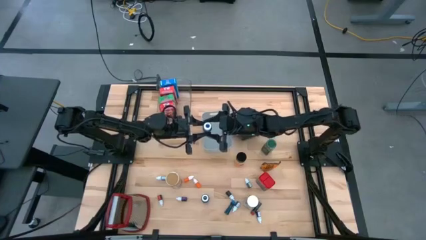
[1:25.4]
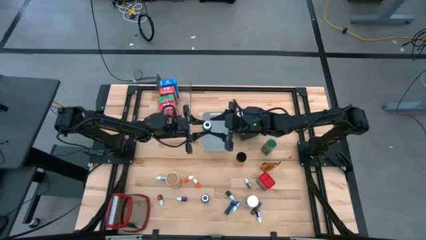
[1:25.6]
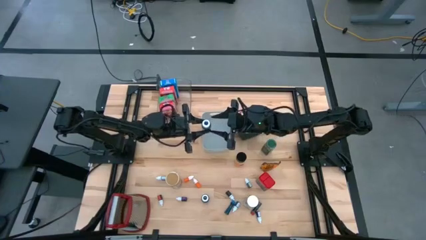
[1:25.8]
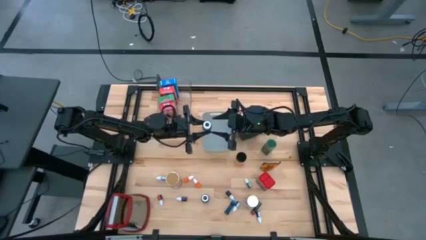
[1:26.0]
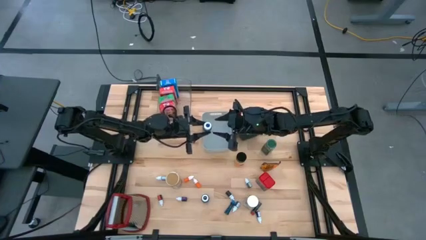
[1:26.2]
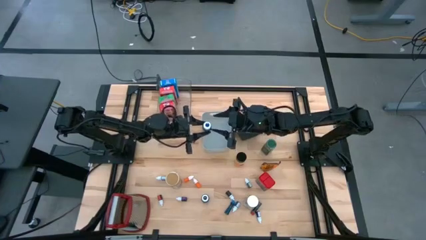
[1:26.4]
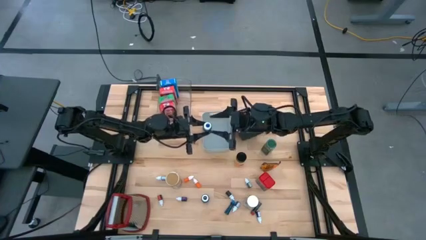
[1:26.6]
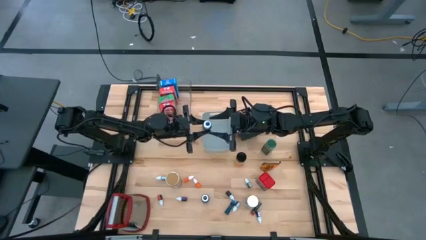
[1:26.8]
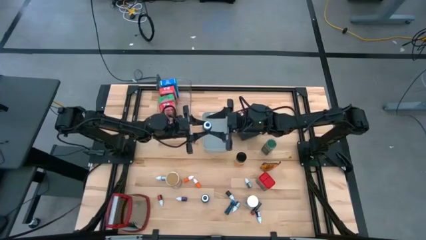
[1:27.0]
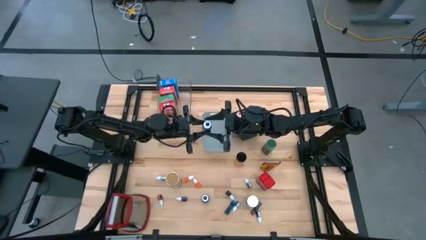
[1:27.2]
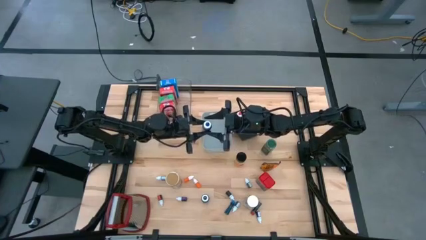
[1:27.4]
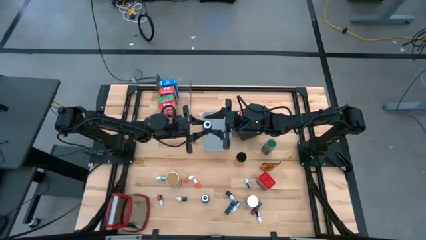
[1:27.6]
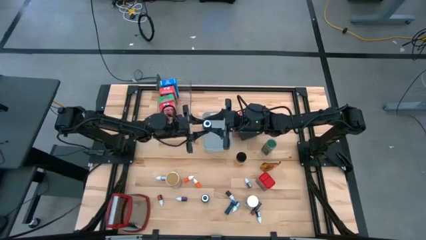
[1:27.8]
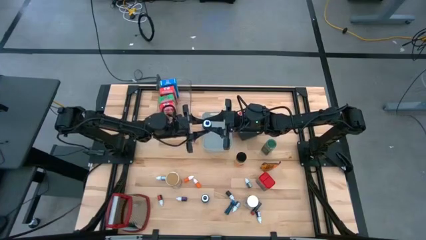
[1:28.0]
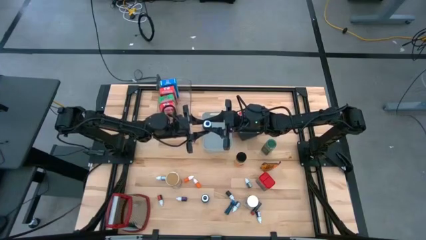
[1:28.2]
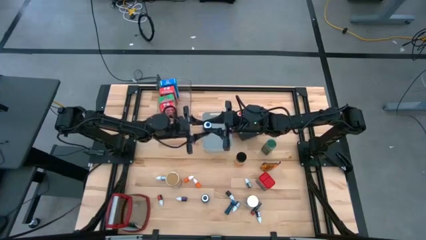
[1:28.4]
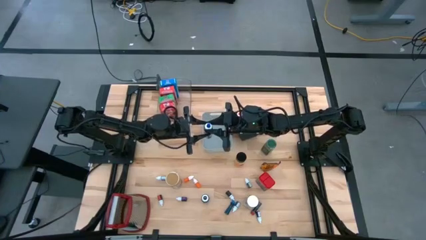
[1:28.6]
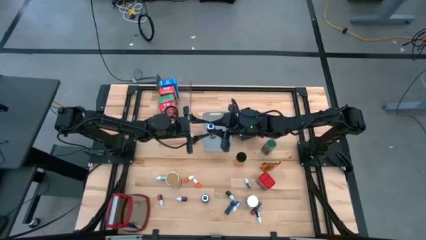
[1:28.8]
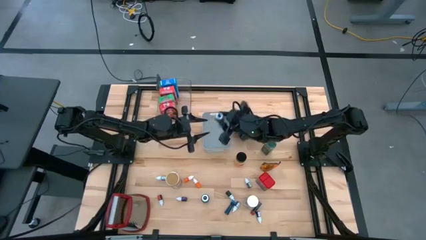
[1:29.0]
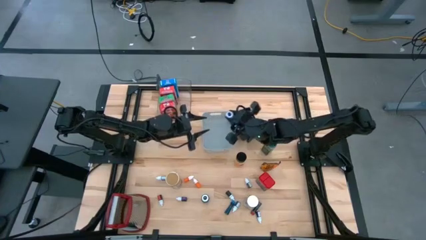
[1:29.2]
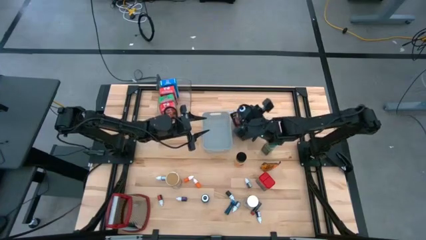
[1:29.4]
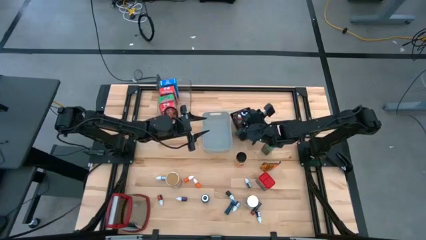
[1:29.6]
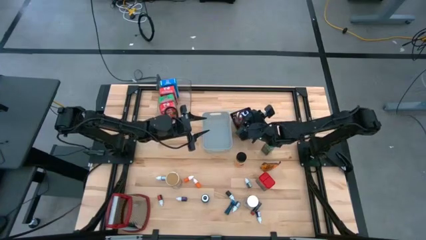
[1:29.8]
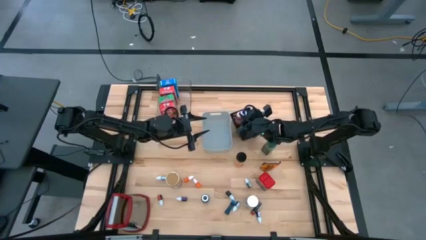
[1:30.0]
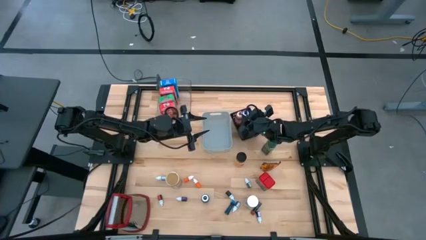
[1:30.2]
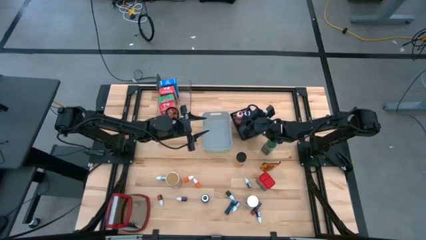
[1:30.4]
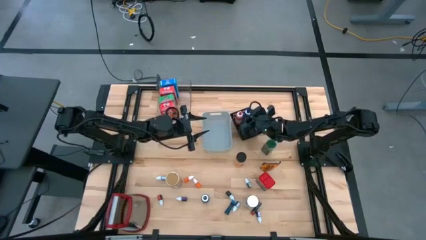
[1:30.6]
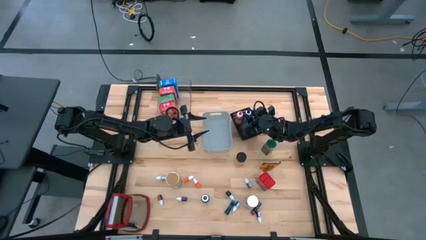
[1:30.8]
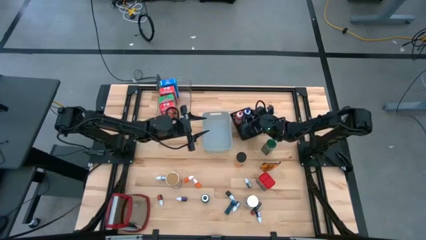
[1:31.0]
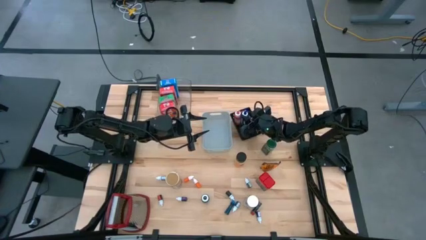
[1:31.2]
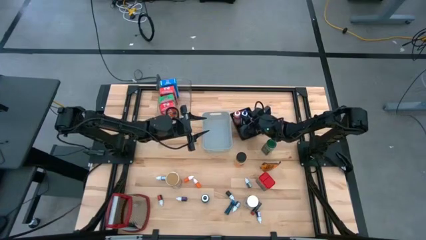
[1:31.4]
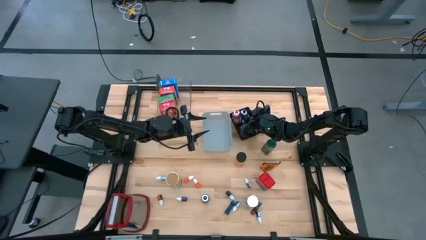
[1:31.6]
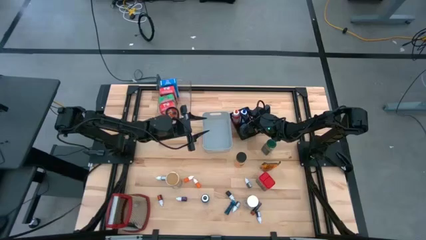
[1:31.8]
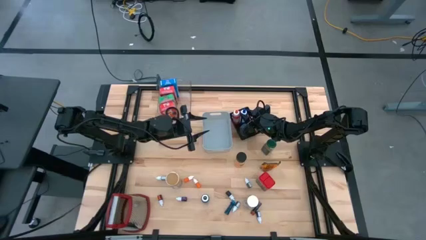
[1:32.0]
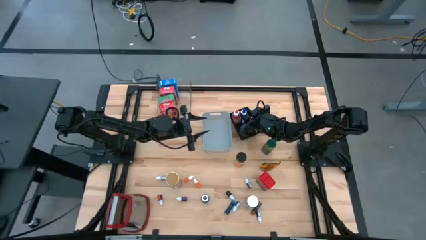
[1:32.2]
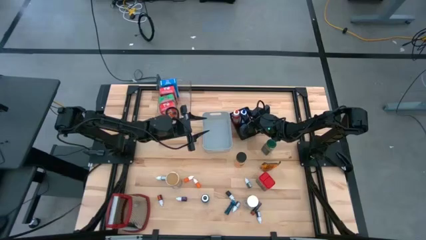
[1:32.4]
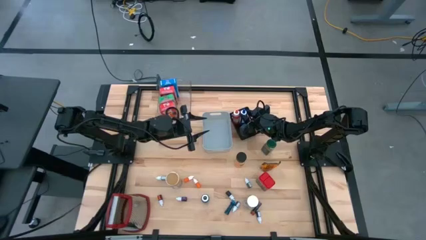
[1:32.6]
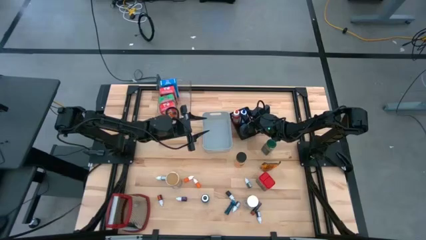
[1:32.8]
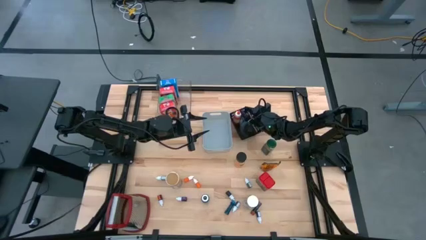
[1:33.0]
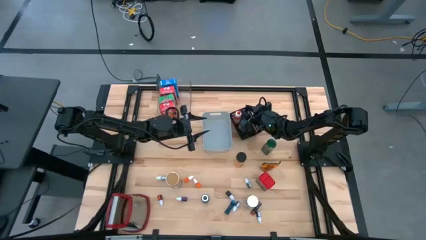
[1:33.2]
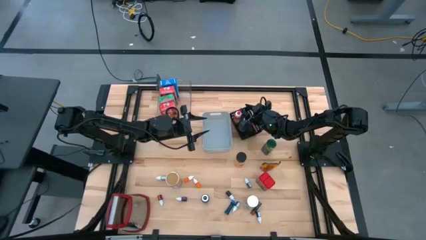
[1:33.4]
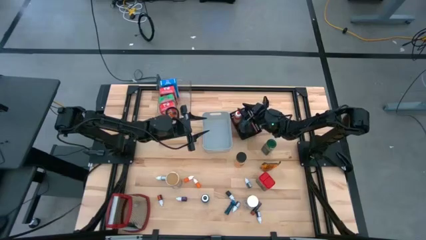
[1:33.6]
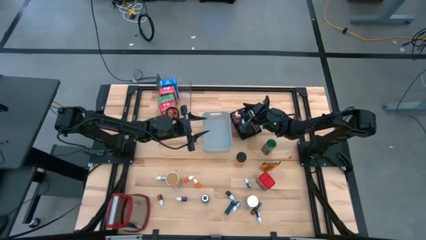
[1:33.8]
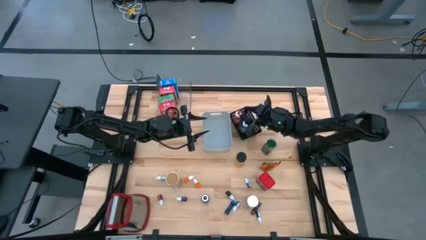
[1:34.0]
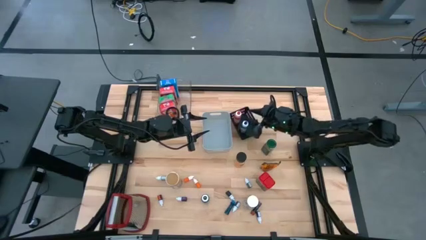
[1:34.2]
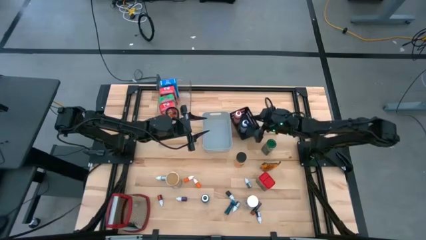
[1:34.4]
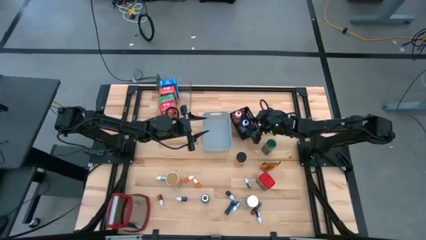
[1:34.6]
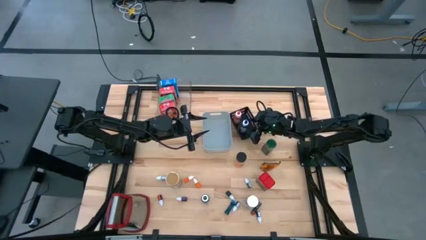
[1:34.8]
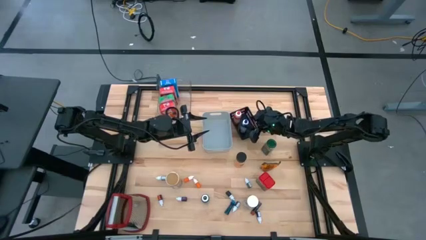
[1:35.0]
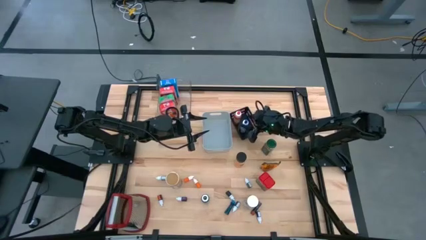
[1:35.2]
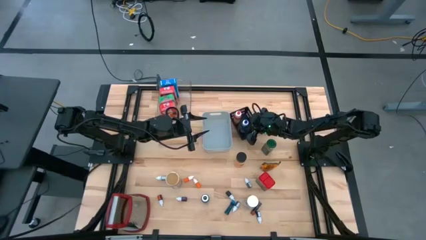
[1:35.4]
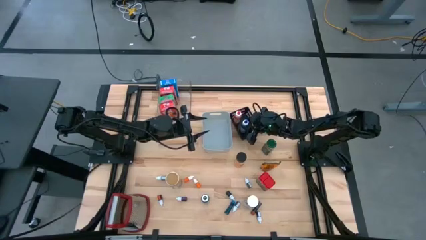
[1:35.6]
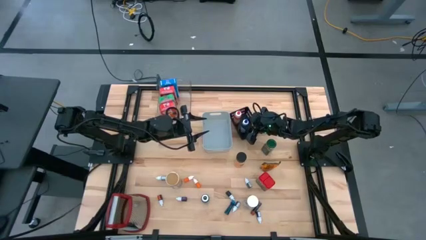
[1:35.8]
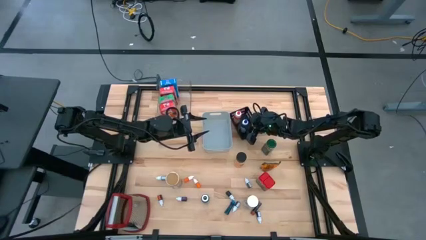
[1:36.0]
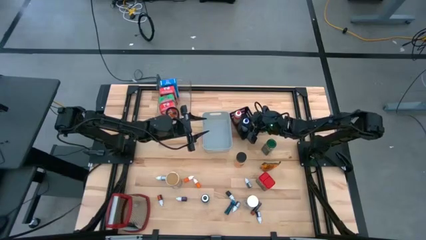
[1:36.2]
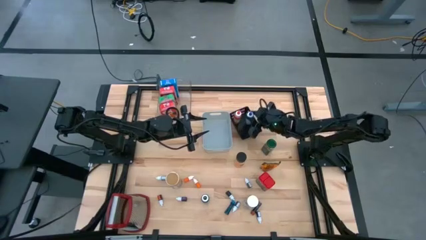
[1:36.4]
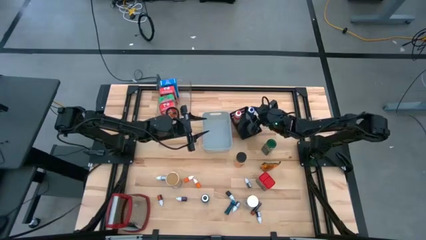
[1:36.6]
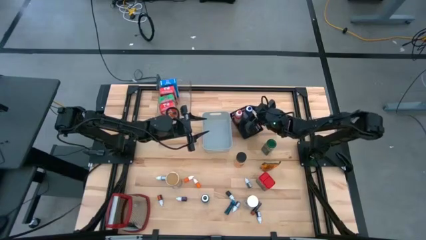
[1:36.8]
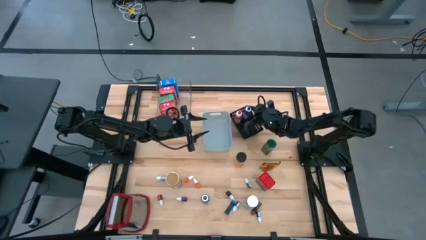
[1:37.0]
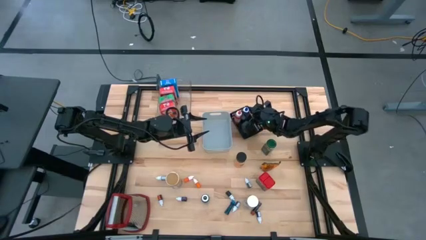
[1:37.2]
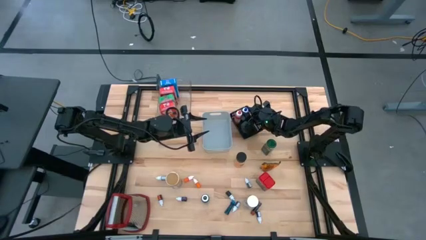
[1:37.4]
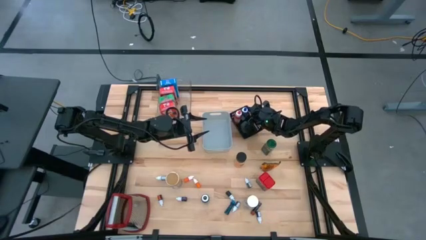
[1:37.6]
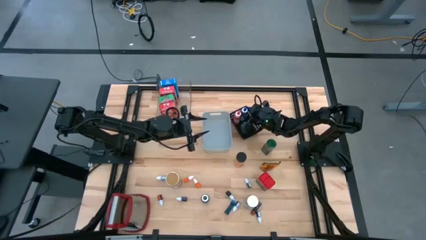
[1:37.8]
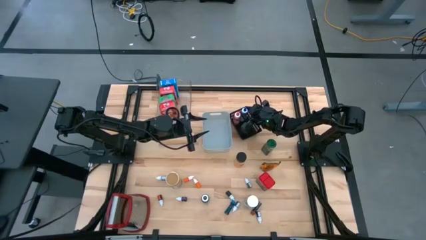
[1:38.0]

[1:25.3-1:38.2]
Task: Pick & Place Kitchen Items
Put the blue food coloring bottle into the black bin

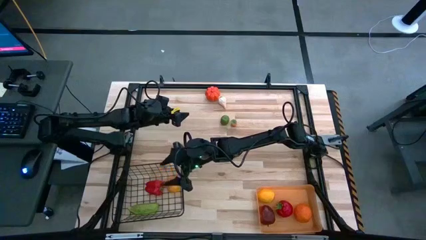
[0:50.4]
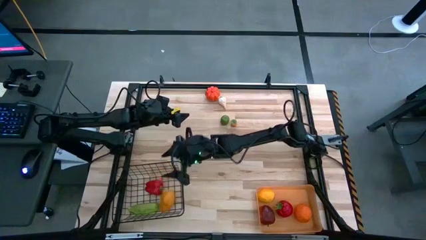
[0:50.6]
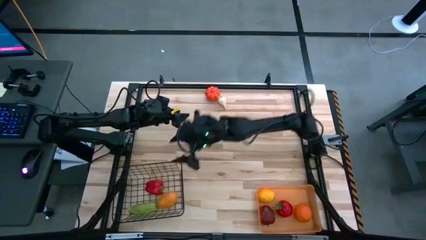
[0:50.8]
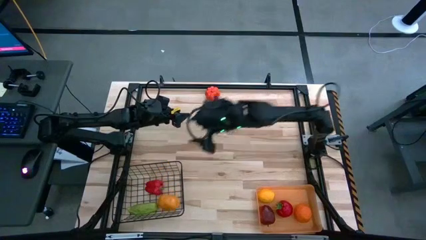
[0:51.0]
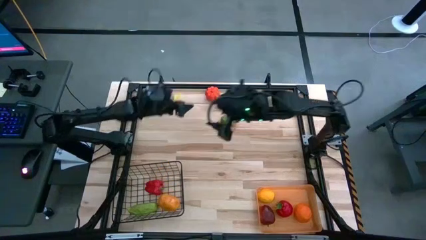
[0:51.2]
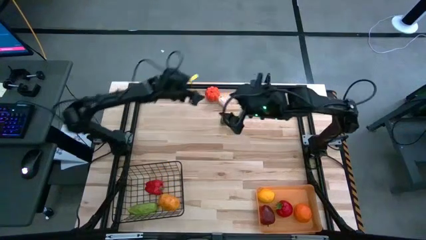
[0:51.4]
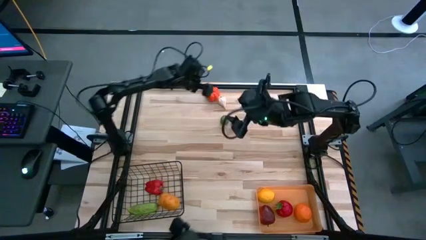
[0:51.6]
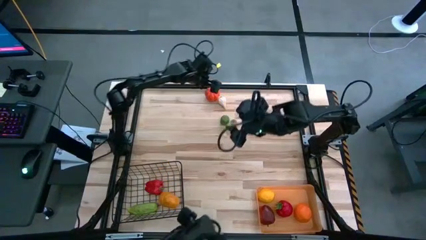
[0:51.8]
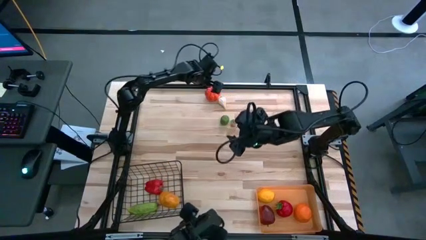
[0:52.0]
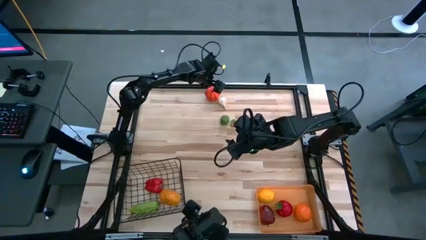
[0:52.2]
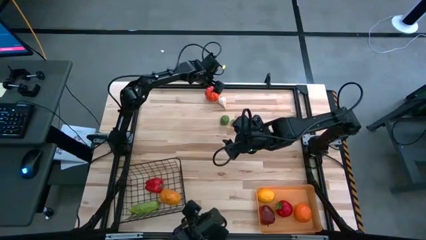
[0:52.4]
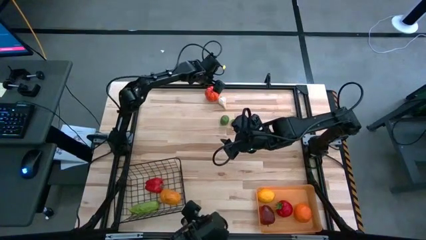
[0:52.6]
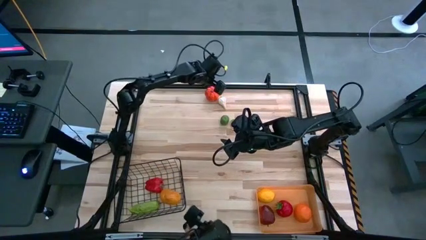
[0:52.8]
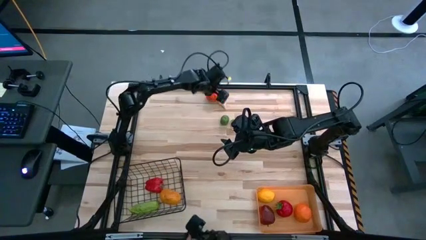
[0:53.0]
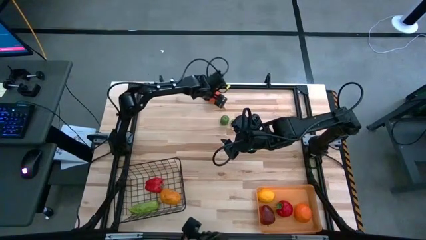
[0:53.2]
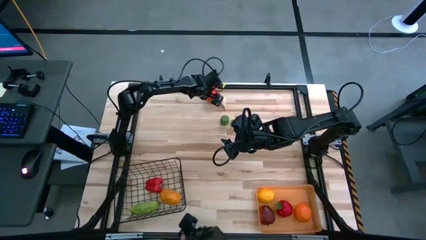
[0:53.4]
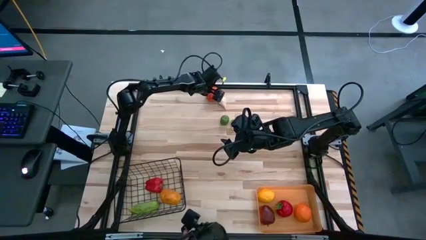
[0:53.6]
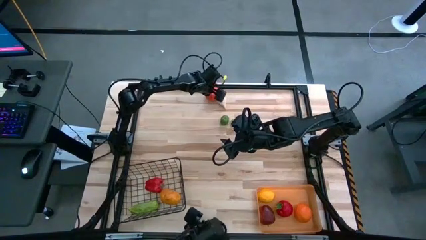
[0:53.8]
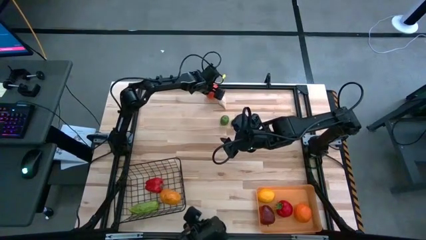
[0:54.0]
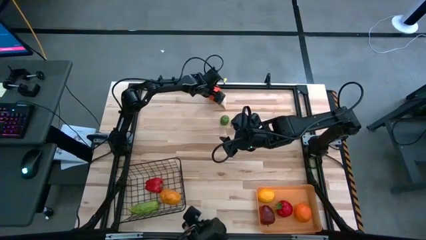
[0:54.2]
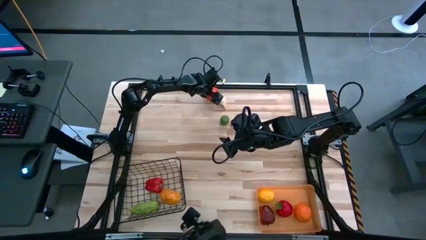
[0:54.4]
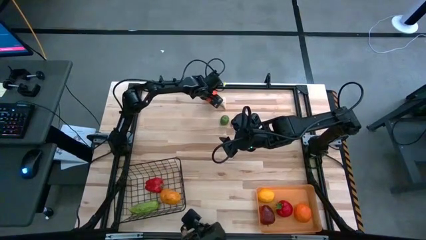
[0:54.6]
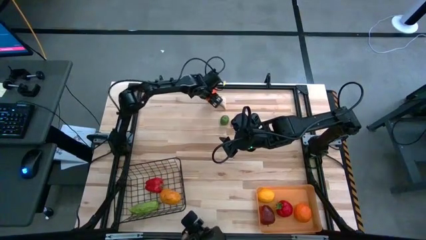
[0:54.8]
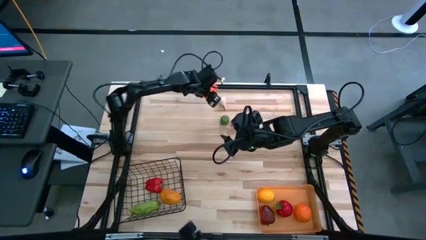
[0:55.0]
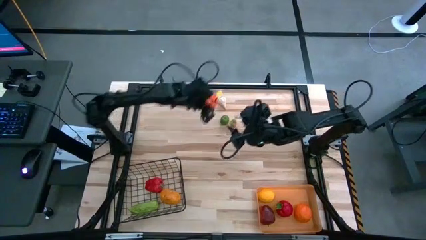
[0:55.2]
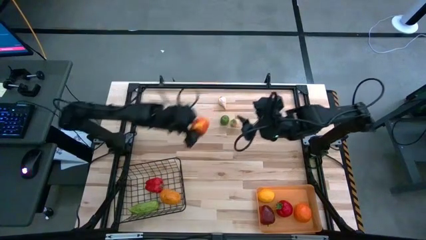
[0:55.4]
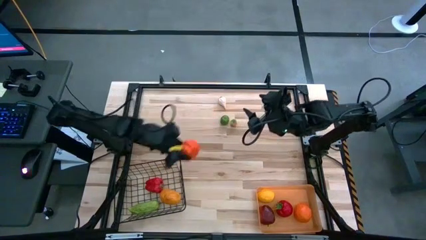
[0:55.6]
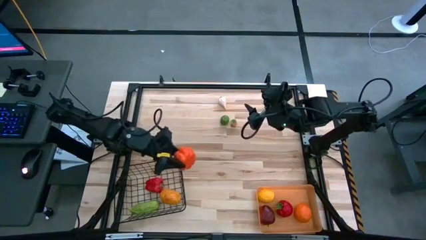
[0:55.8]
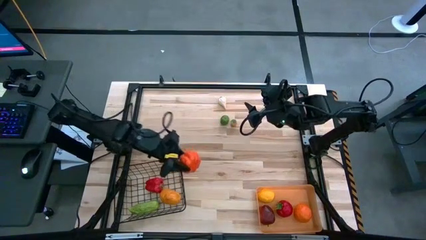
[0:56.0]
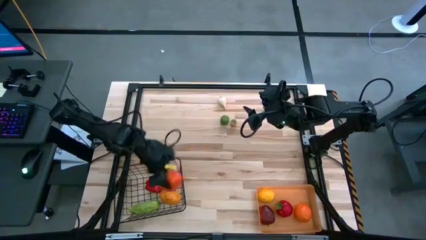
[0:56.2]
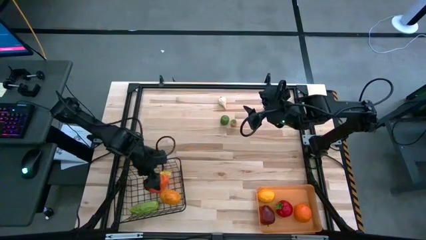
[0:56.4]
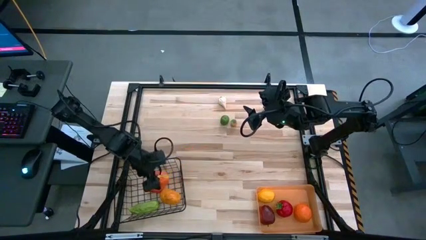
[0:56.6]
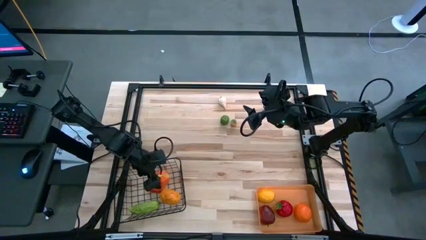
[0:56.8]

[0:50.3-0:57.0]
Task: Sort produce into baskets
Put the orange pumpkin into the black wire basket
